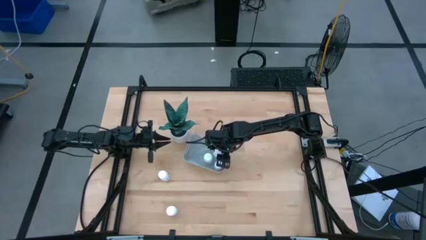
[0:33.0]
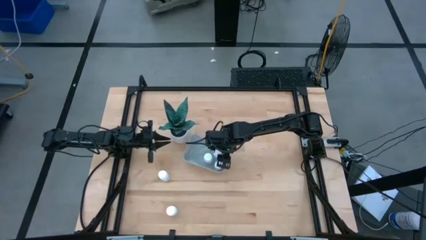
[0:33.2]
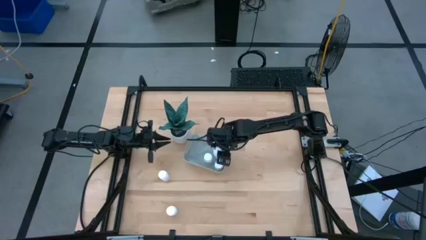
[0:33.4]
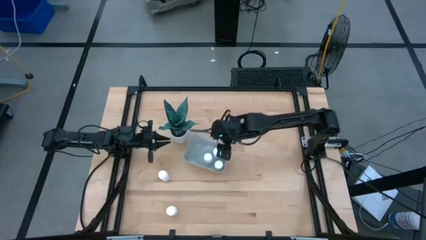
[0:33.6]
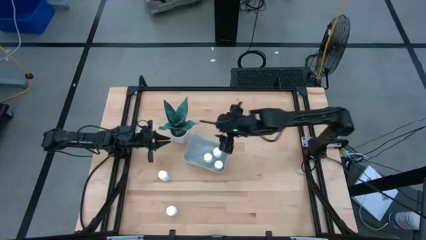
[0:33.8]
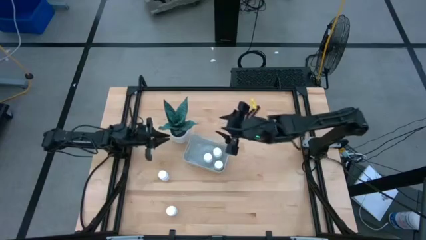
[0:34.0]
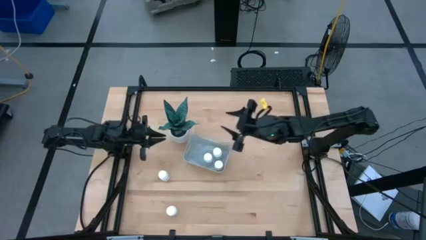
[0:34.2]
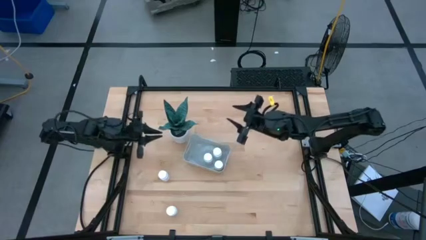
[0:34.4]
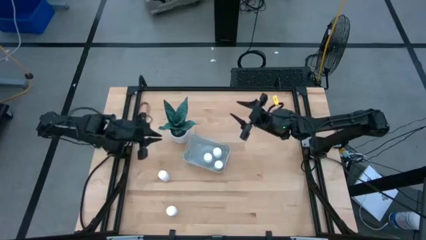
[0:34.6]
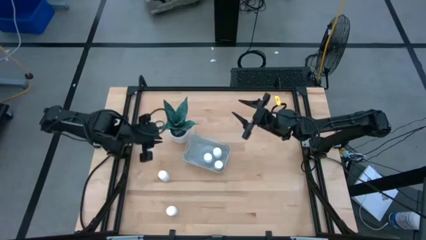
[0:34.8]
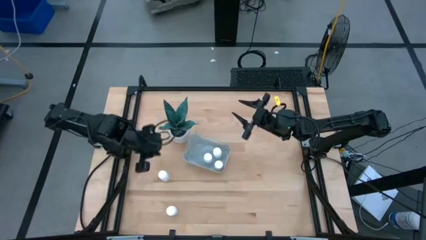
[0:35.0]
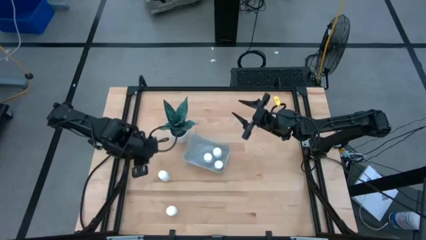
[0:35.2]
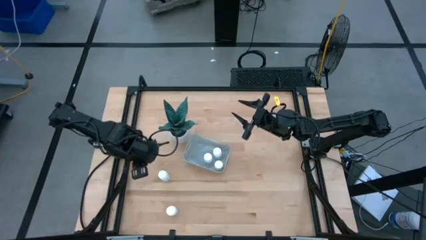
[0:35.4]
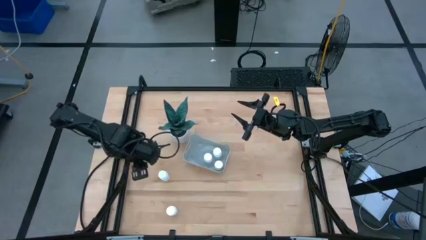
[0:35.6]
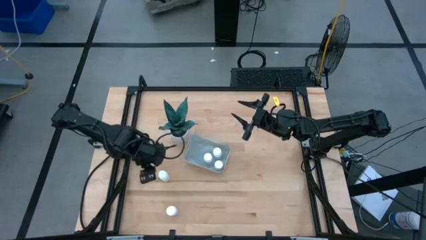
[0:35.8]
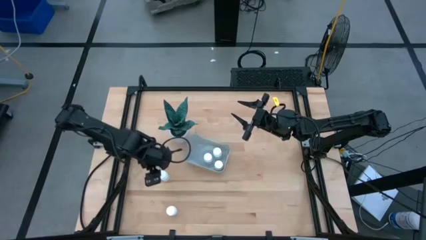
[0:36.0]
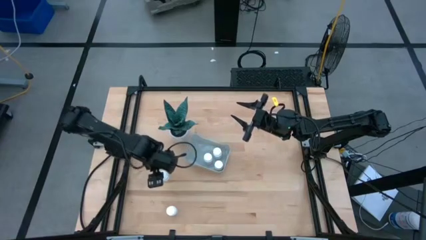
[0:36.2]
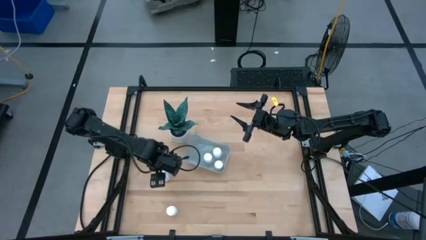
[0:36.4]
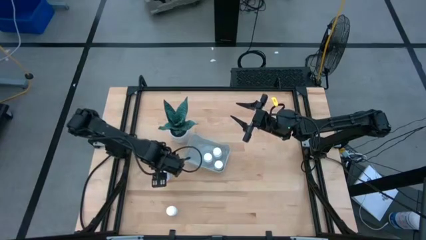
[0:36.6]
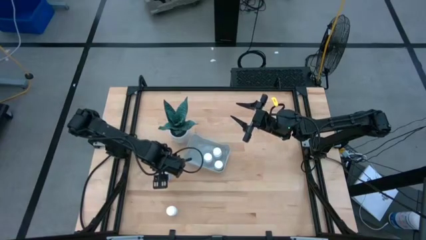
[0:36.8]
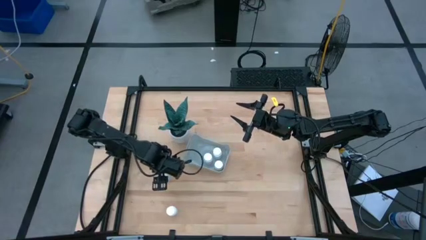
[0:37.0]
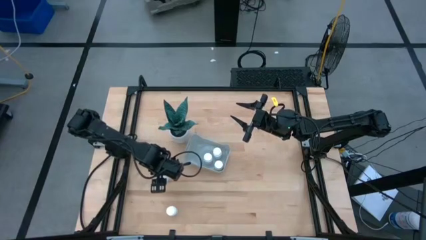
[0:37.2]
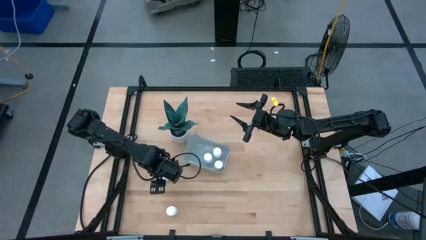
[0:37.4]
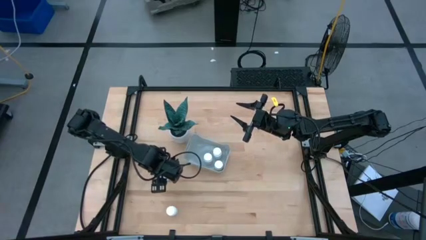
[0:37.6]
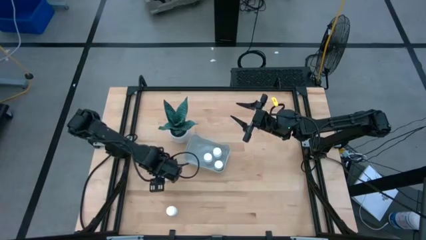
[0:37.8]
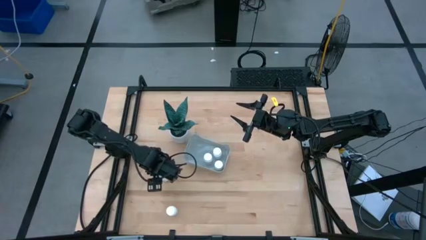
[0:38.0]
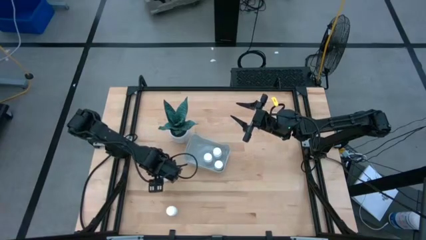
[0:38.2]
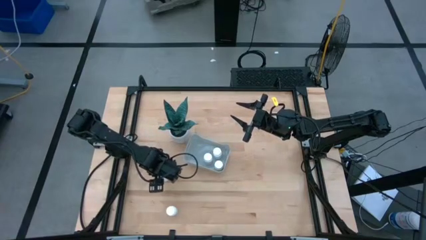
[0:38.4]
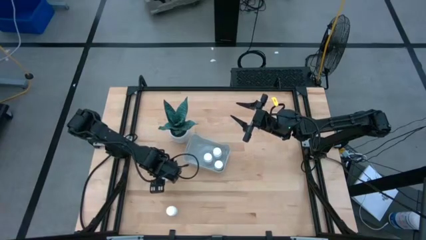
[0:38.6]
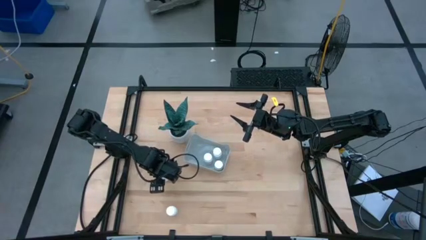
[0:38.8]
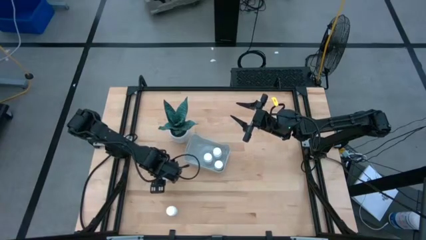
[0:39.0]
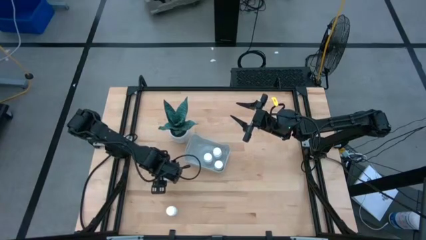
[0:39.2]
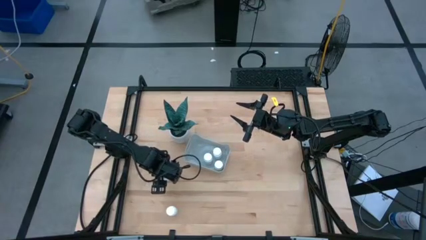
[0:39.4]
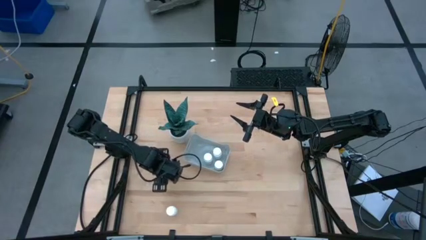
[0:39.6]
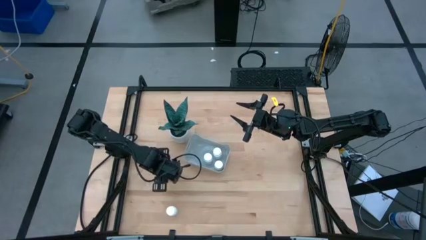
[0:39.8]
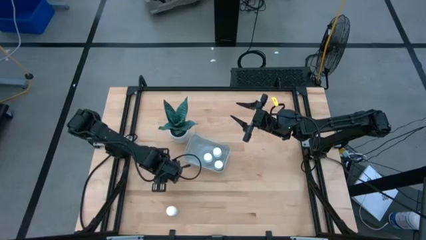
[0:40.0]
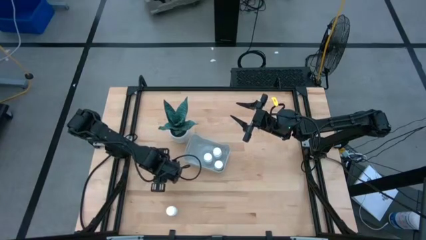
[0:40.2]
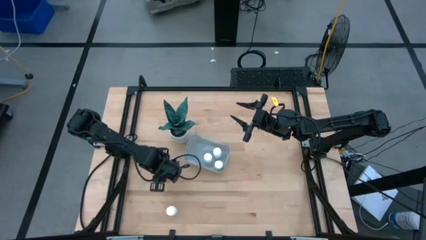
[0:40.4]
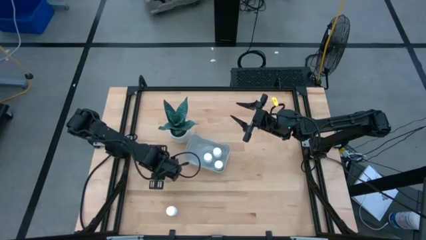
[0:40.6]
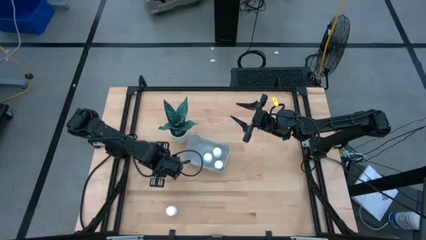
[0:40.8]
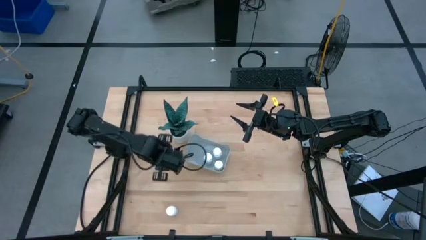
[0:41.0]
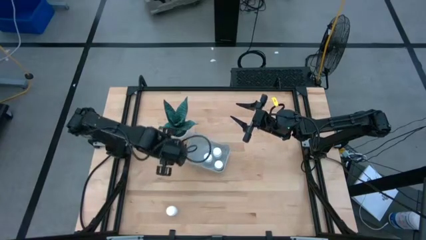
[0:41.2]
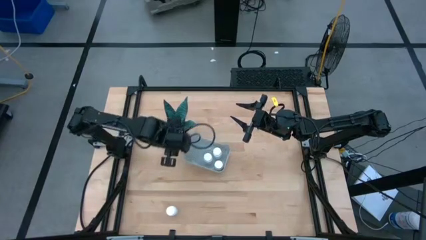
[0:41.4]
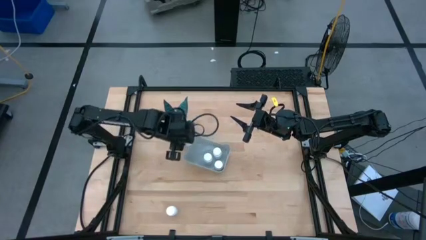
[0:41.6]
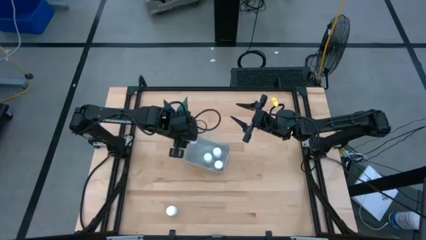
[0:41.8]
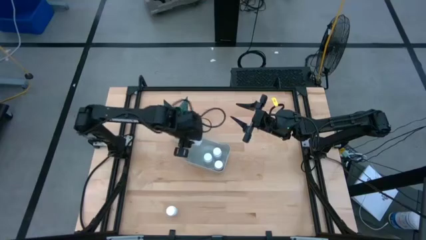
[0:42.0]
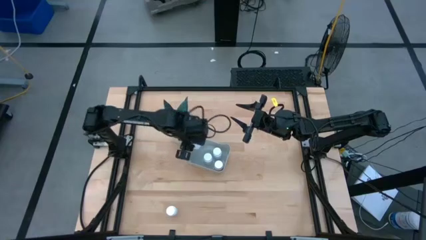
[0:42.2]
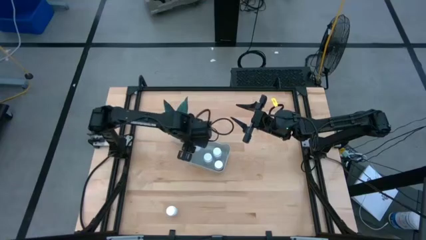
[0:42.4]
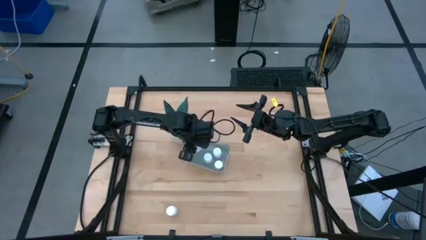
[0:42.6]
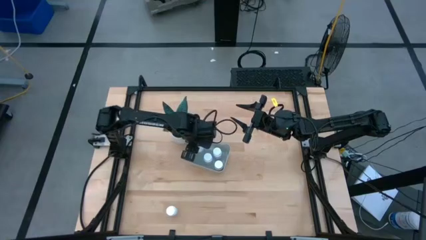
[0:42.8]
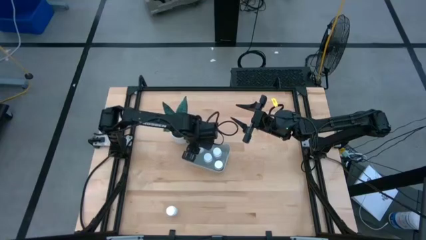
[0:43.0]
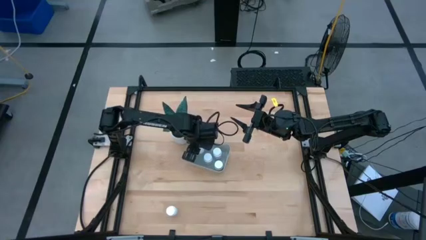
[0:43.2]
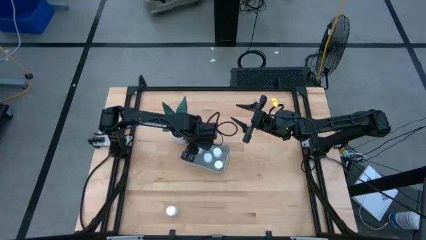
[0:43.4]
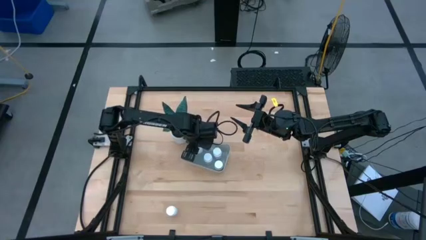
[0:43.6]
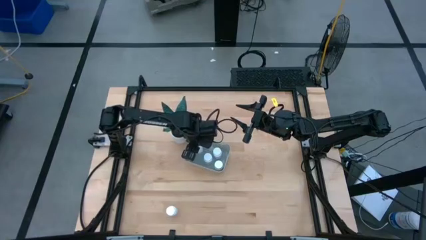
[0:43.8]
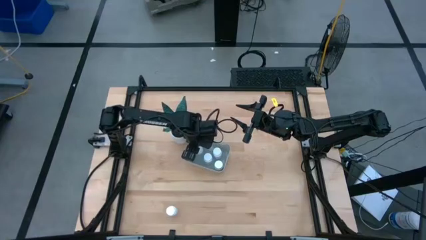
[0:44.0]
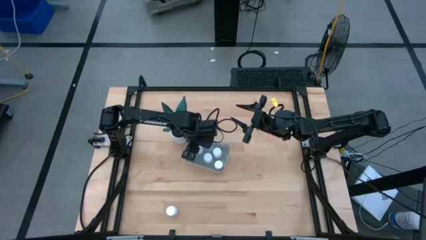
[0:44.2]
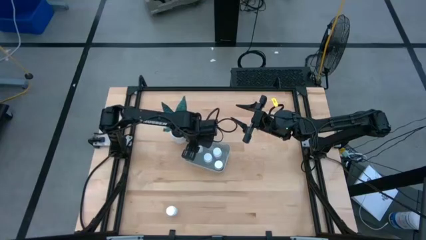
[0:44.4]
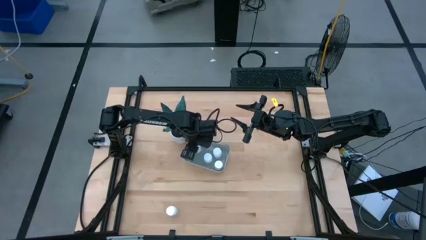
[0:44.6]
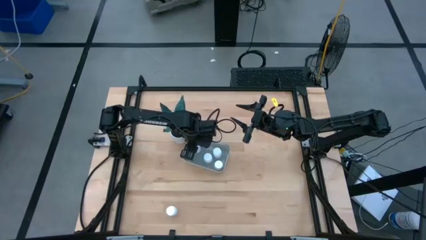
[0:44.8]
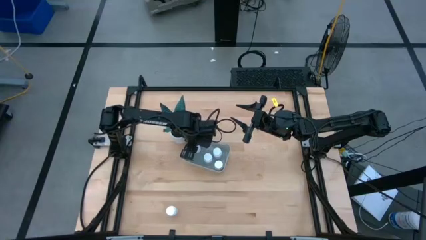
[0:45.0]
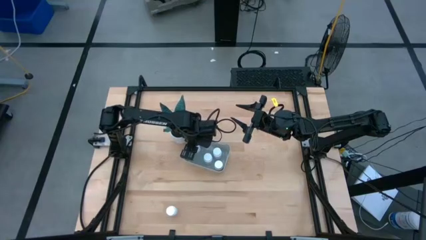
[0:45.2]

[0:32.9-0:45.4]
Task: Pick and place pill bottles into a basket
Put the white pill bottle into the gray bin
